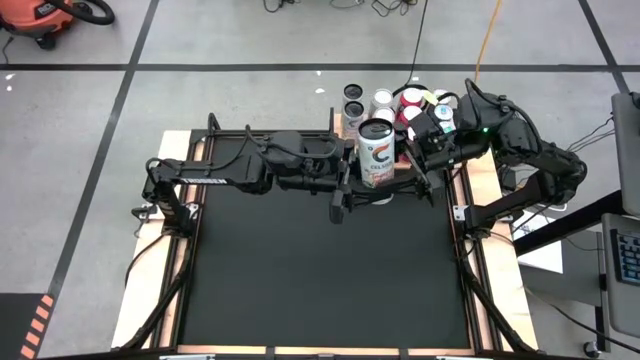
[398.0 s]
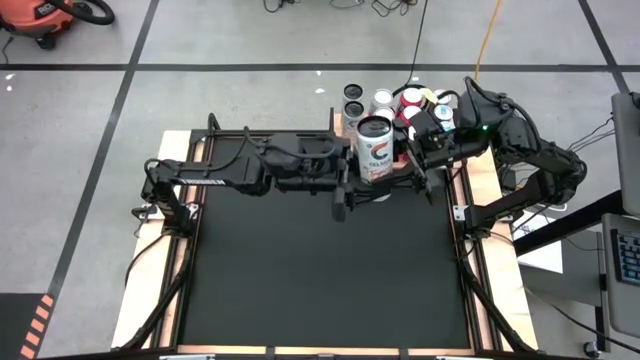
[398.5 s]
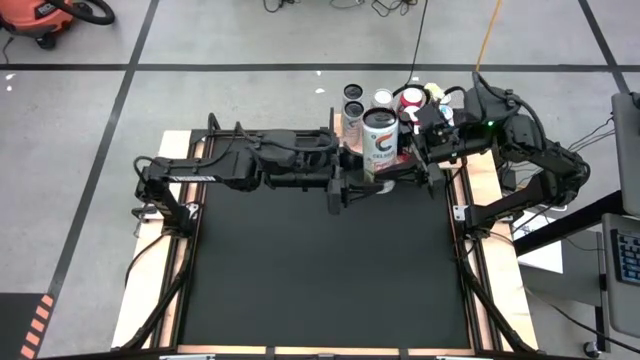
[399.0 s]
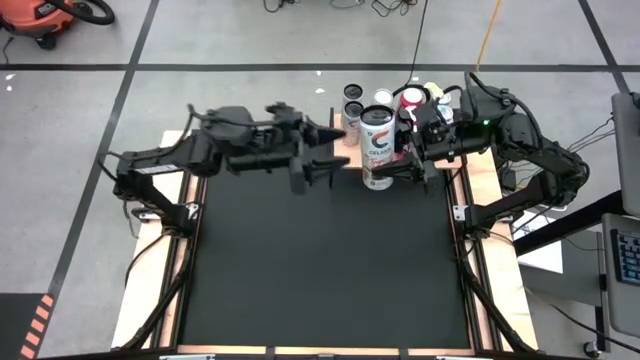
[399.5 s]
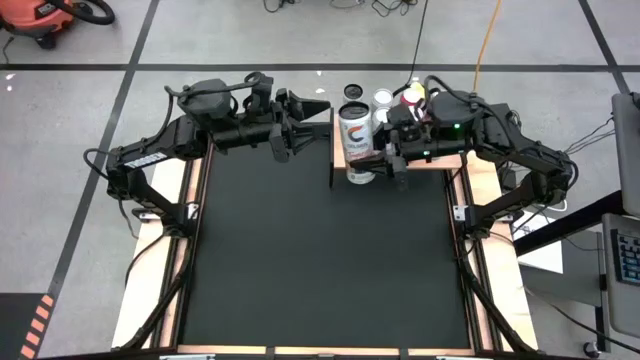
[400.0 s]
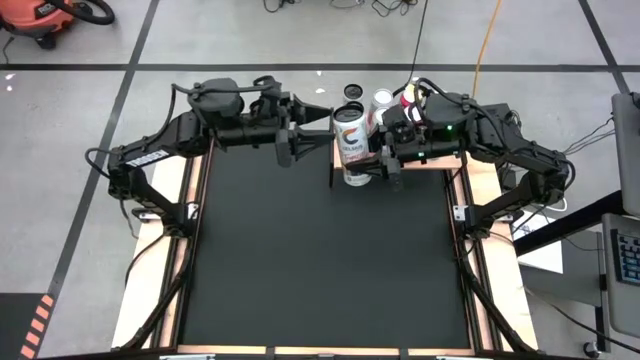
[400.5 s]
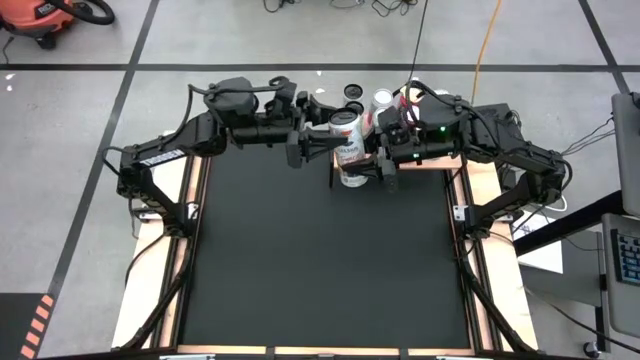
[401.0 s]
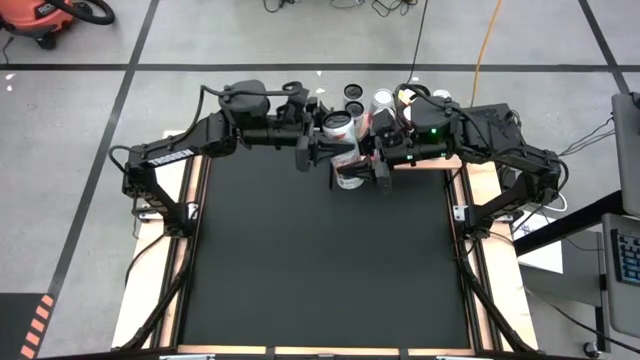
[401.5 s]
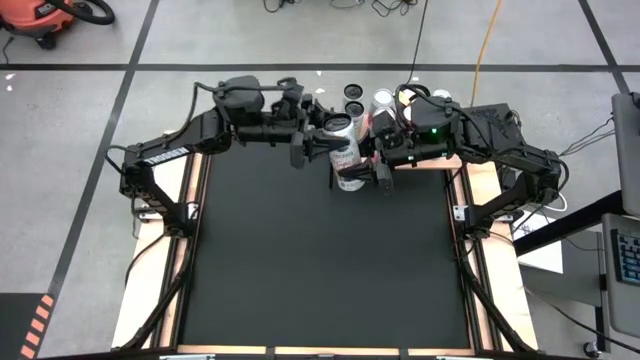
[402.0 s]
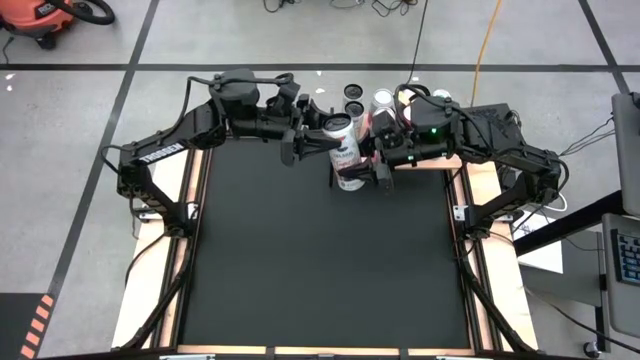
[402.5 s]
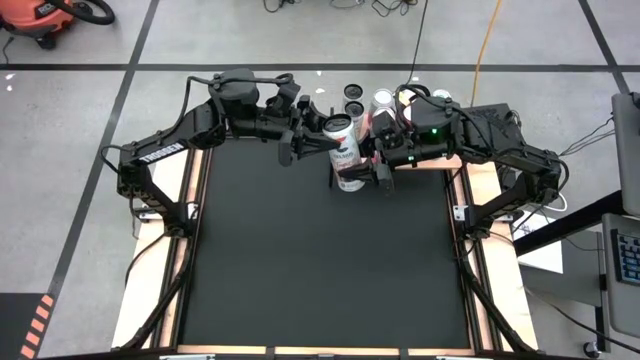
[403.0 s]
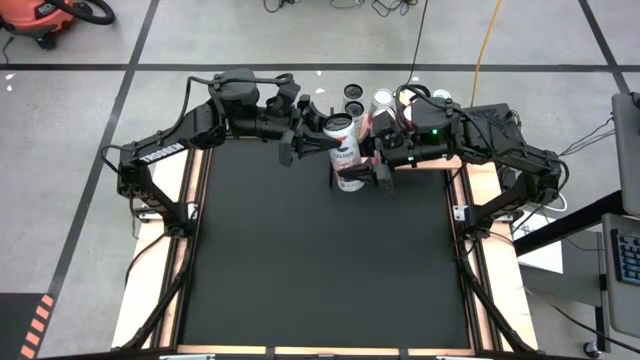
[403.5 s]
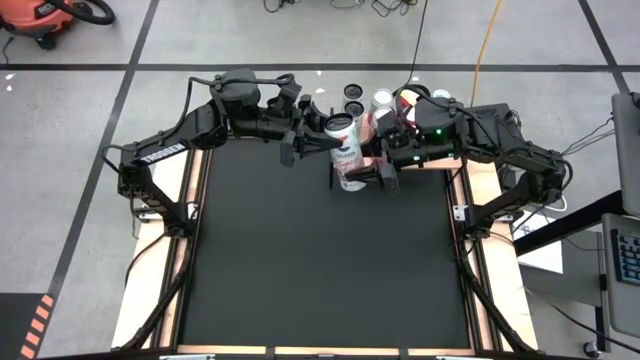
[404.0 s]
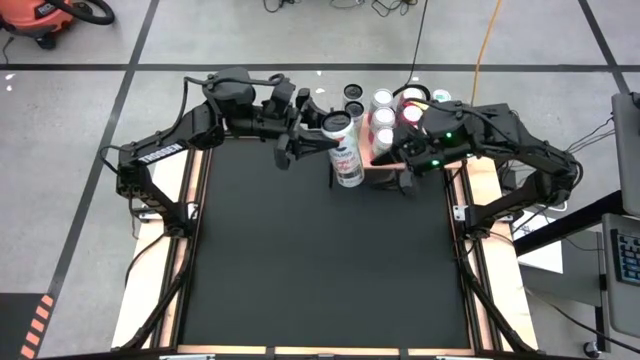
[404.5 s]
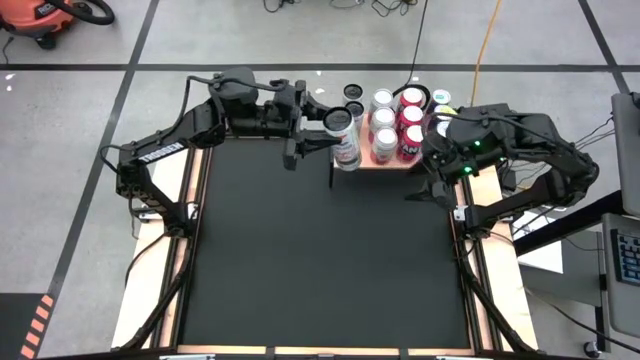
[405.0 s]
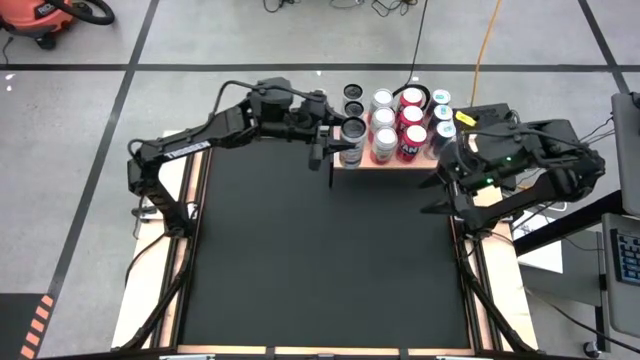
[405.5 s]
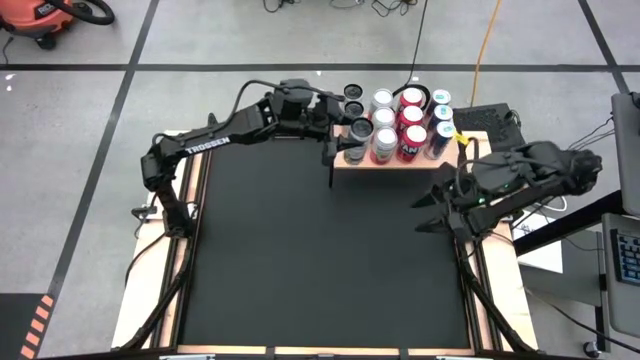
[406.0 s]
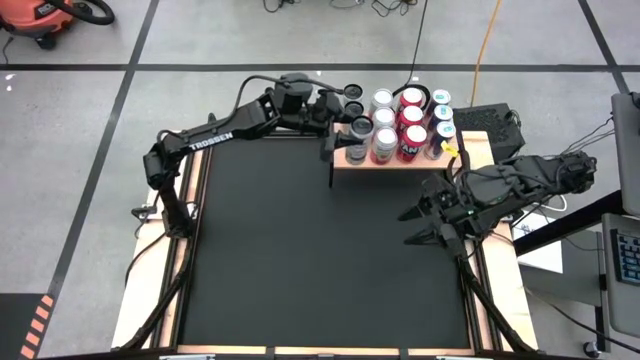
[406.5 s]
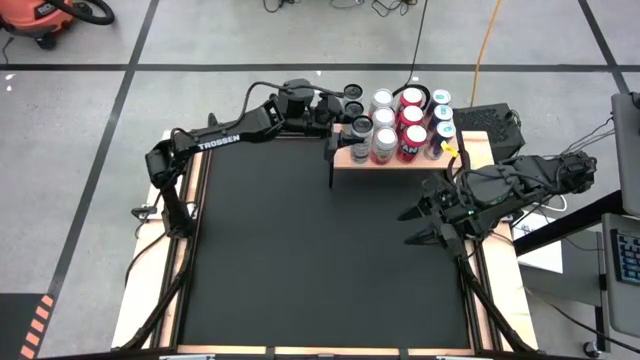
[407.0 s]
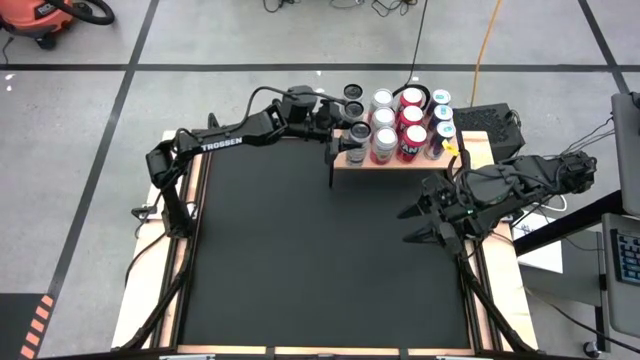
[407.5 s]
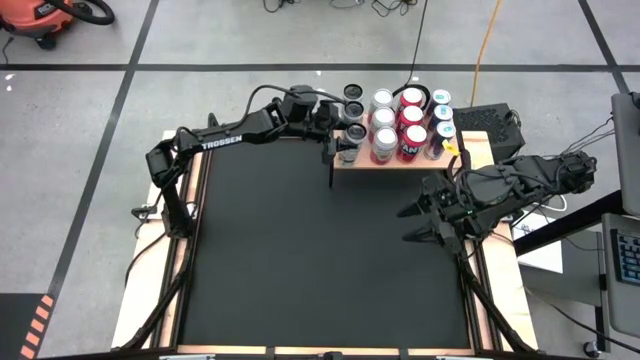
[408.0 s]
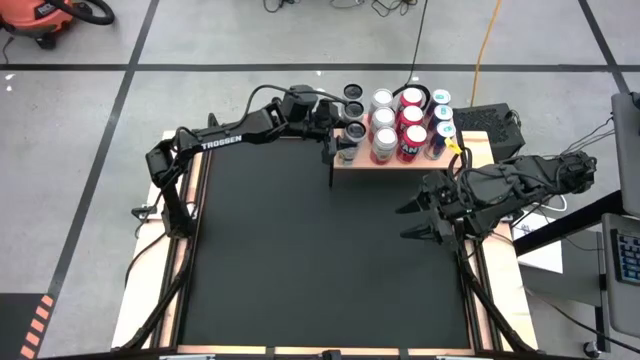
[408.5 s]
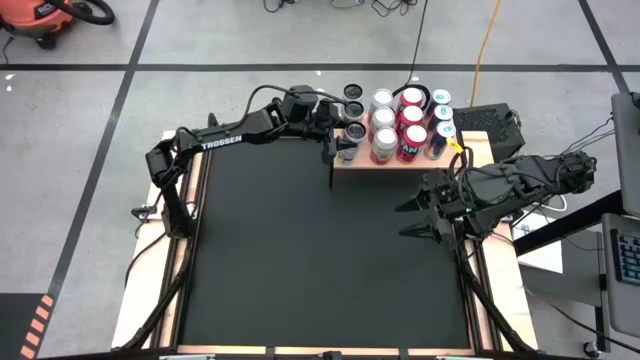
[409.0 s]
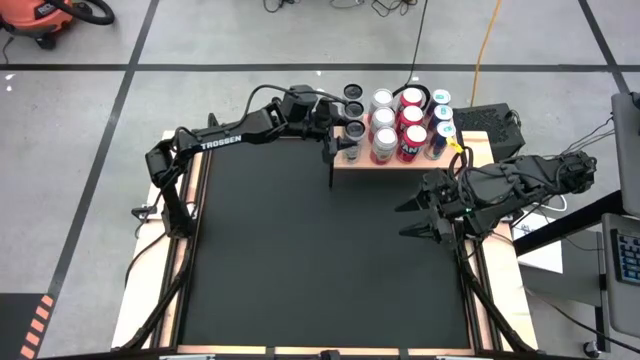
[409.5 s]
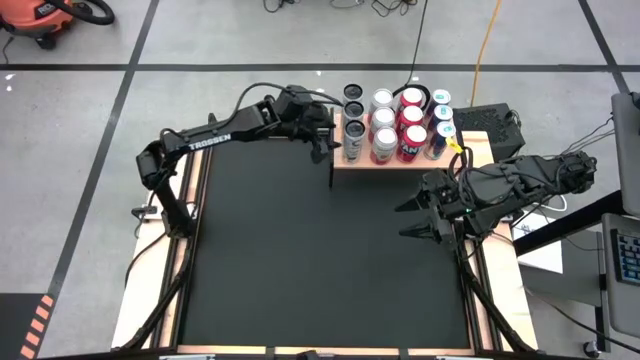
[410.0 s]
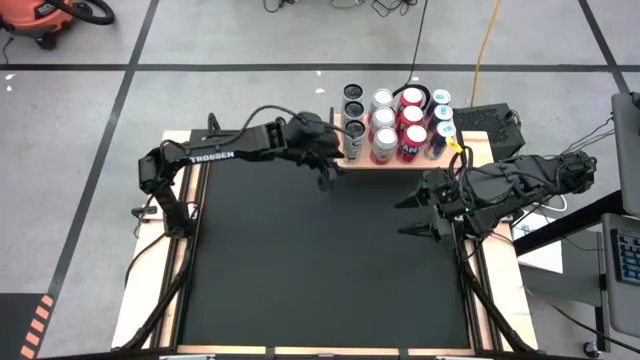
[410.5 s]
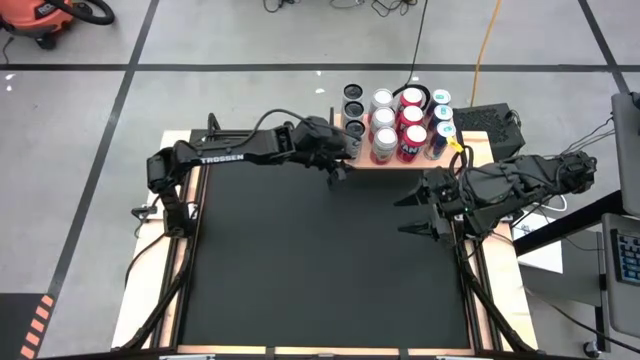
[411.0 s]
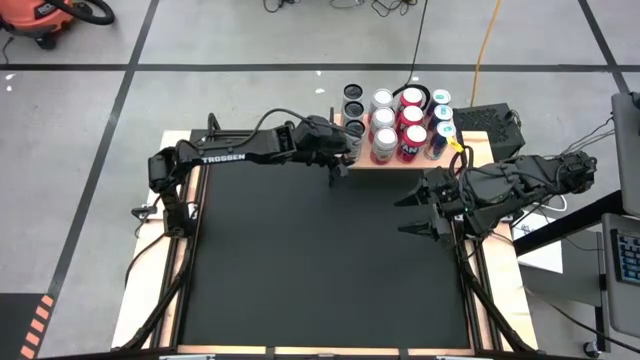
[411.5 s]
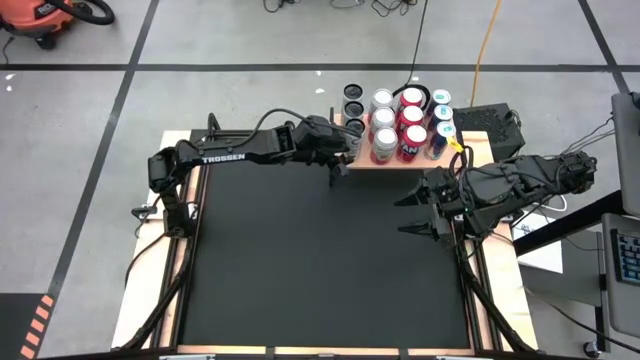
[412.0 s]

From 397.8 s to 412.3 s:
Task: Place canned beverage on shelf
Put the white yellow soda can on the shelf aligned with the other white yellow soda cans

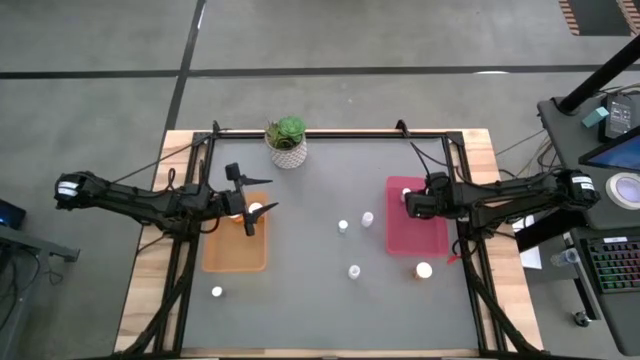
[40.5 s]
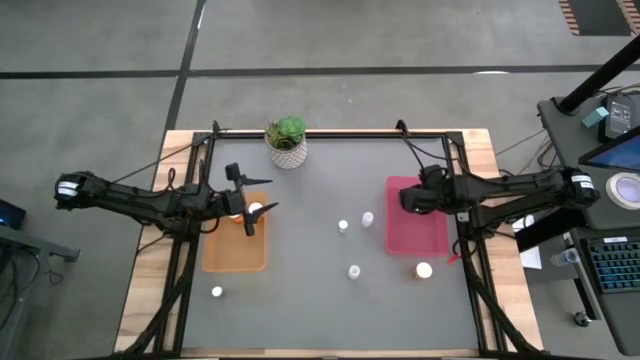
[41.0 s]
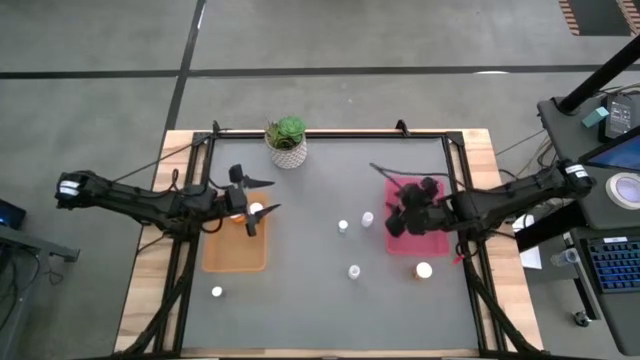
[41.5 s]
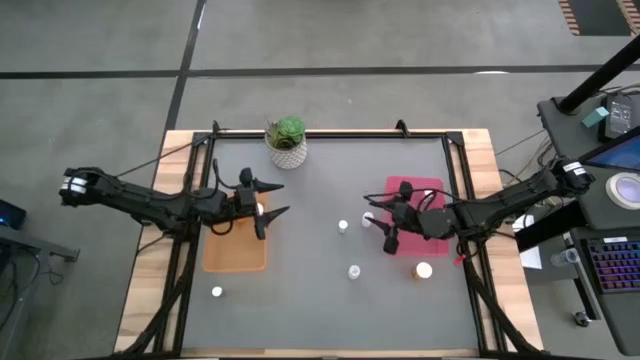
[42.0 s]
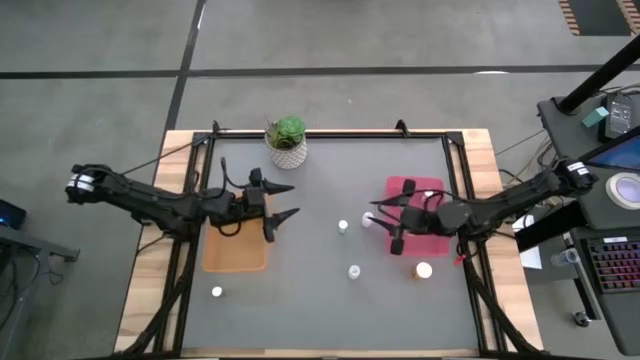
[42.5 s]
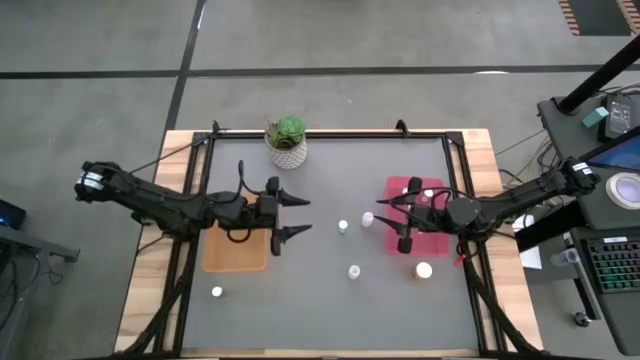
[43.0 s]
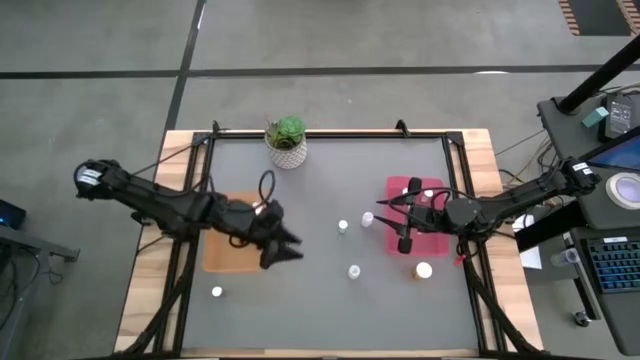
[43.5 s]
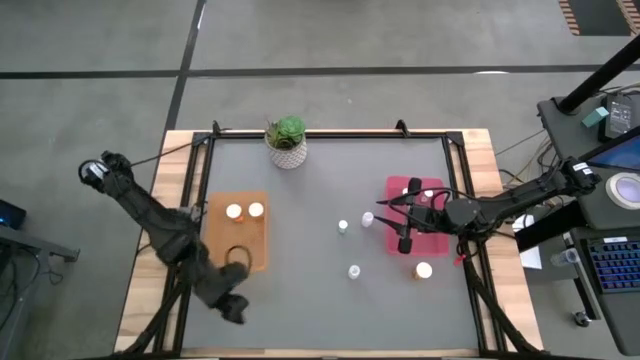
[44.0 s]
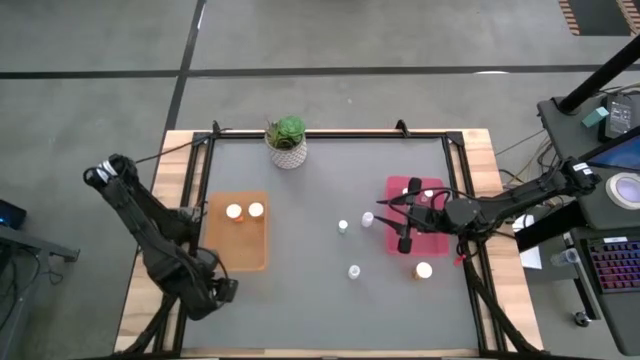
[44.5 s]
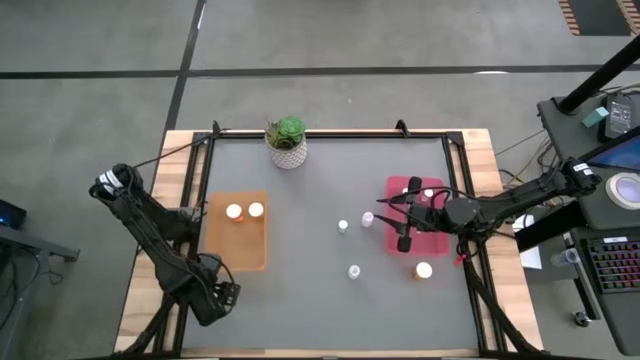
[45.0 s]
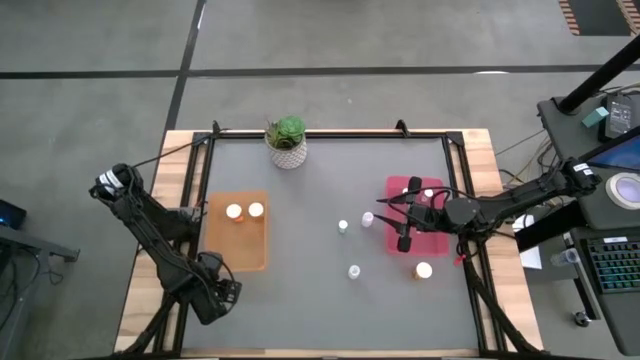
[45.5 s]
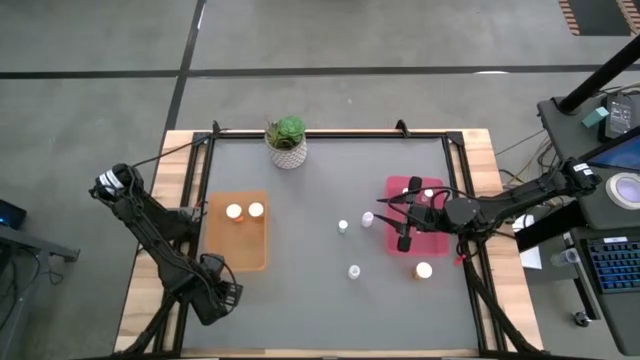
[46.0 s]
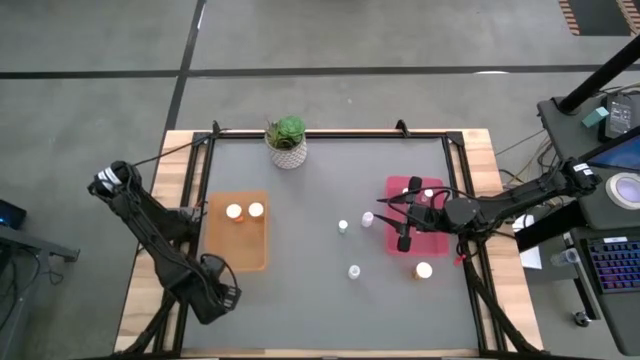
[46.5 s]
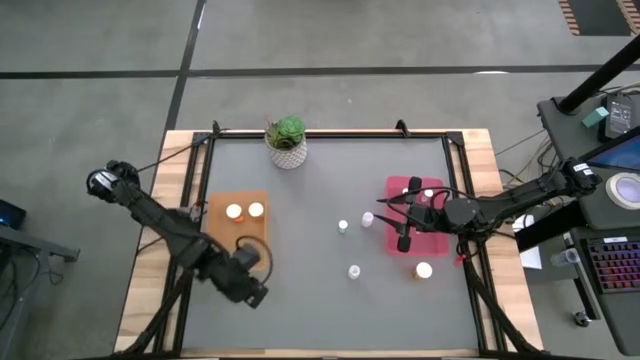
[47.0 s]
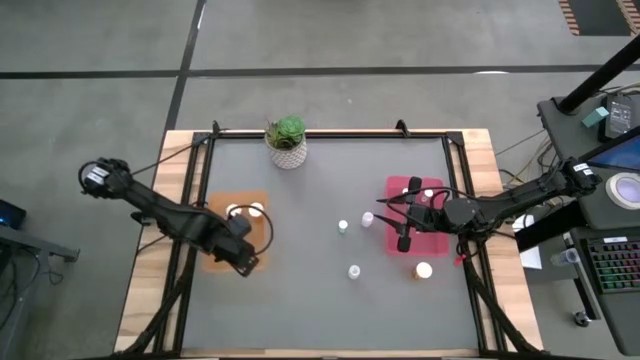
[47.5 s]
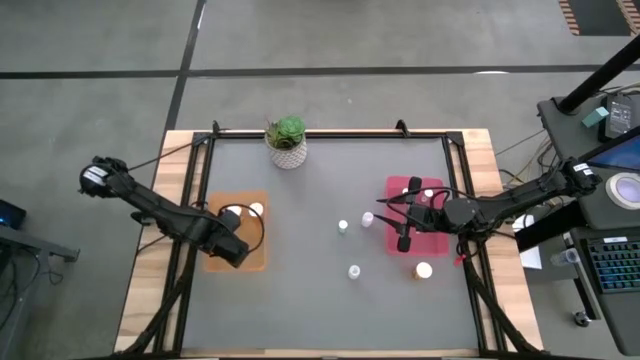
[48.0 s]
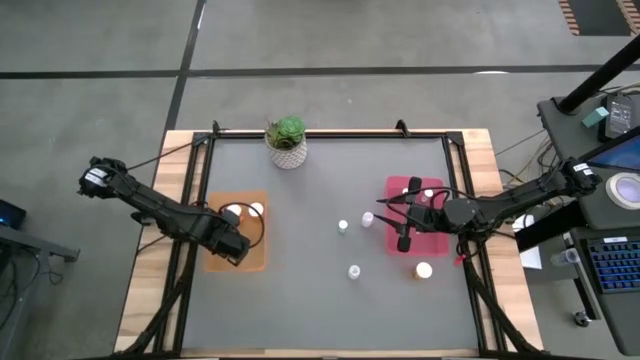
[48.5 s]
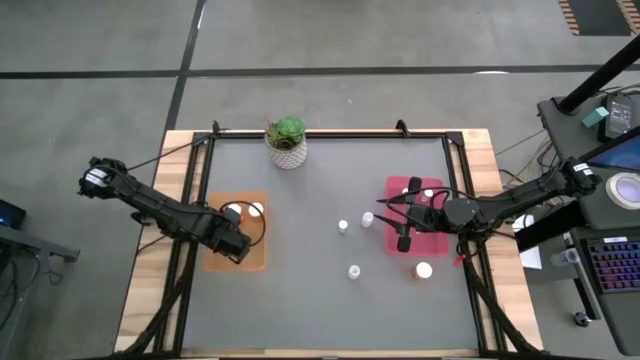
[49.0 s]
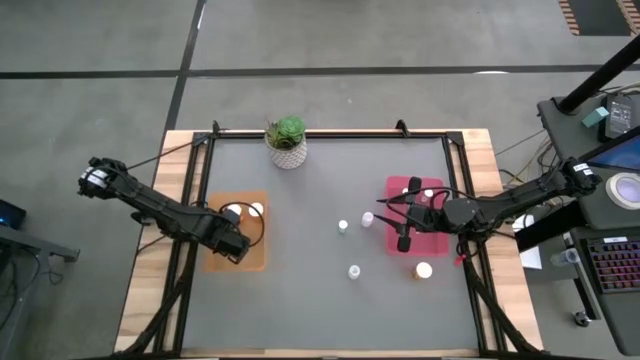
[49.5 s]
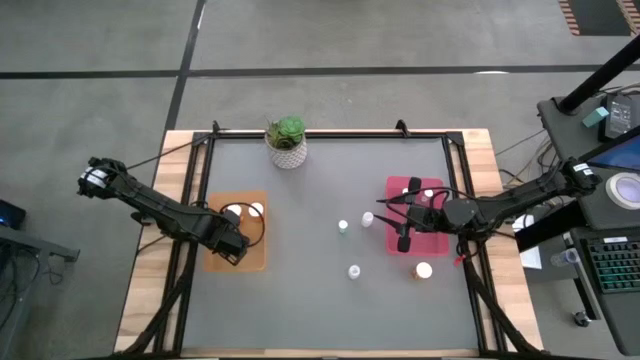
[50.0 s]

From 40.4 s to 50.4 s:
Task: Pick and place medicine bottles into bin by pill shape (circle, oval)
Put the blue capsule bottle into the orange bin
